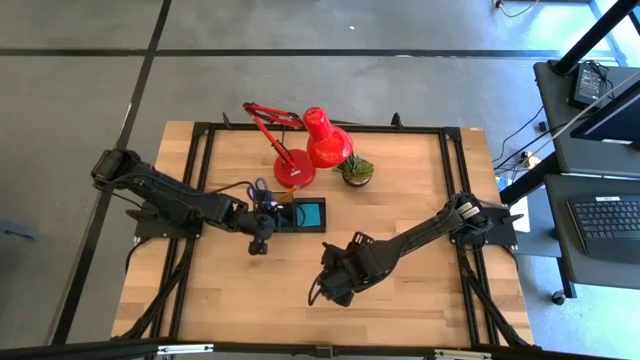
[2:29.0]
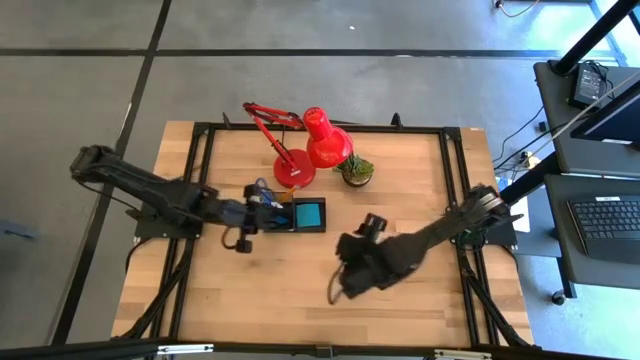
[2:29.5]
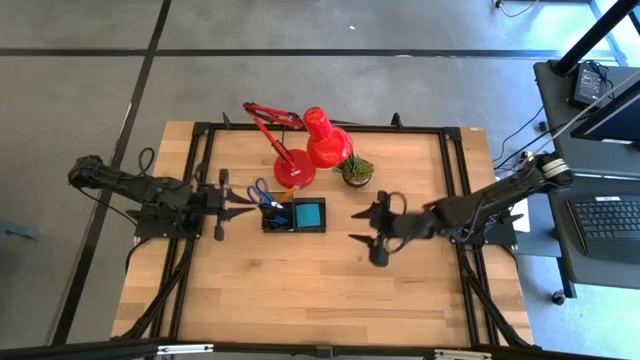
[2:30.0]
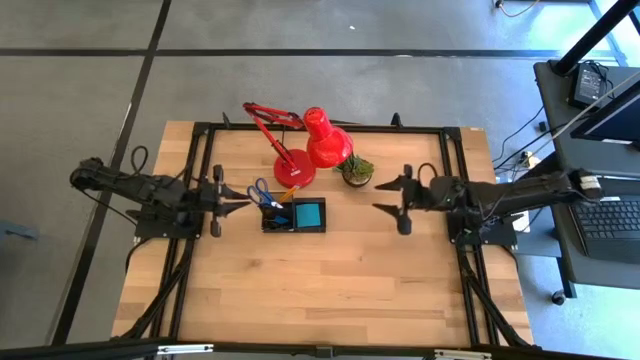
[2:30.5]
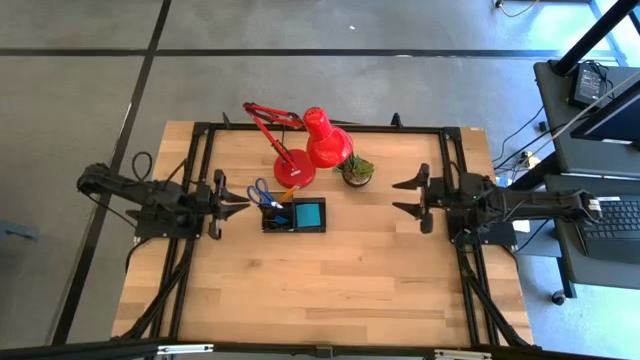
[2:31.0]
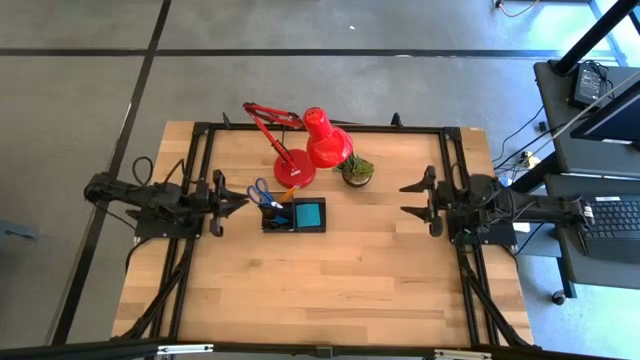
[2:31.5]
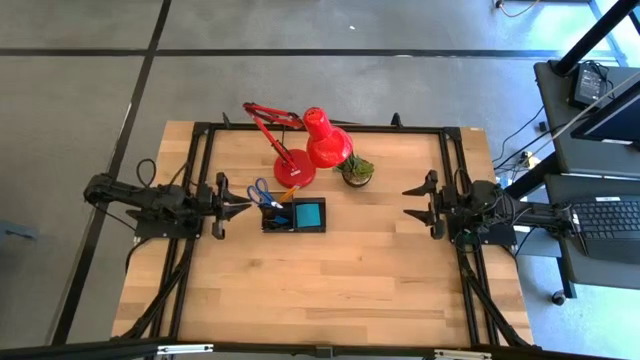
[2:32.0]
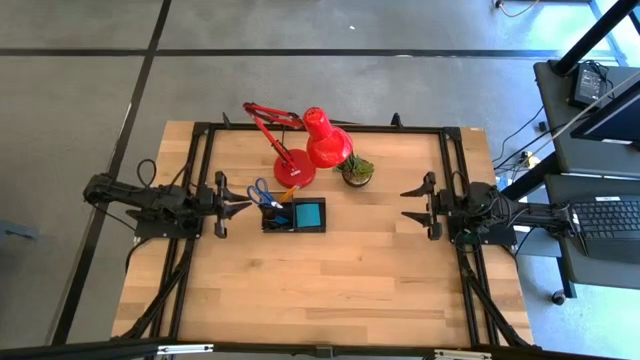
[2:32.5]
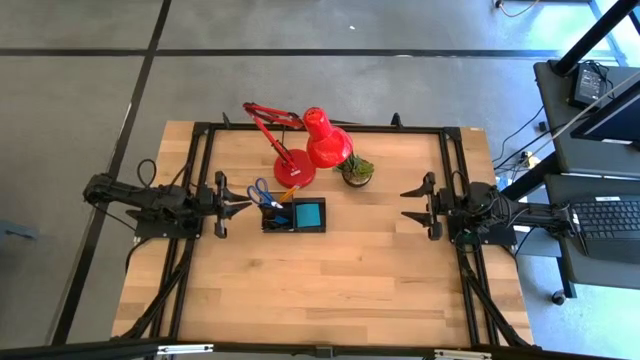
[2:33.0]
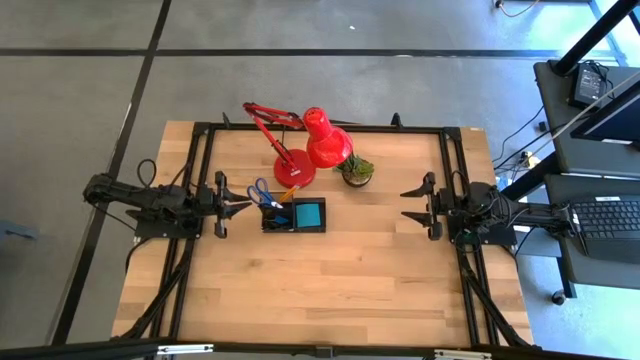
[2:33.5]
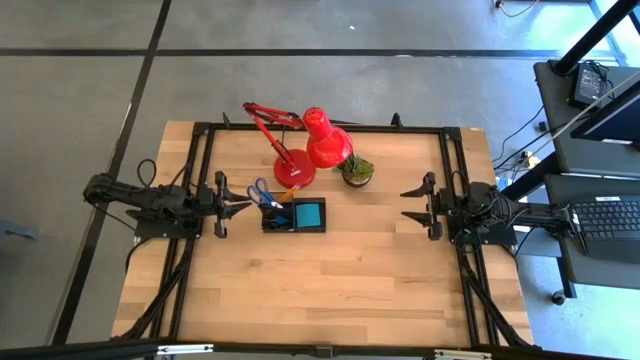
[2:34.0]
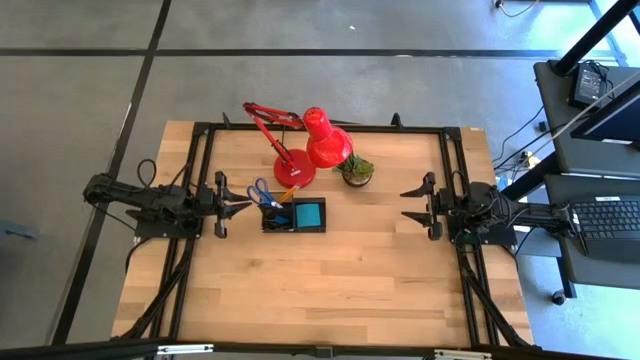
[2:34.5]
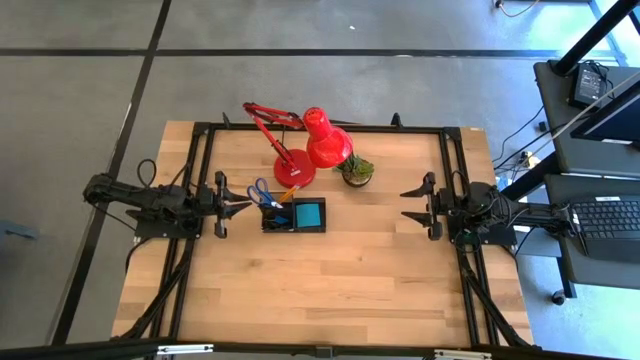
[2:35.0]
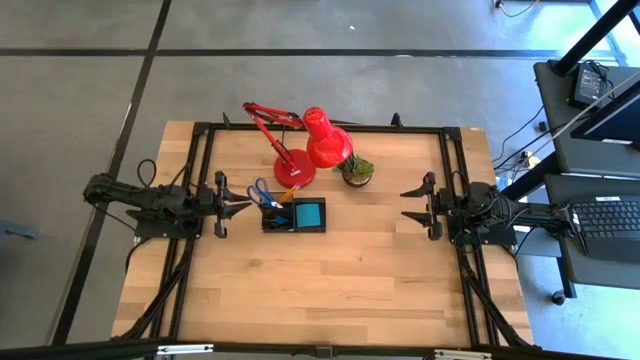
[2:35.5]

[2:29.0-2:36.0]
Task: Pick and place office supplies into organizer
Return to Home Position

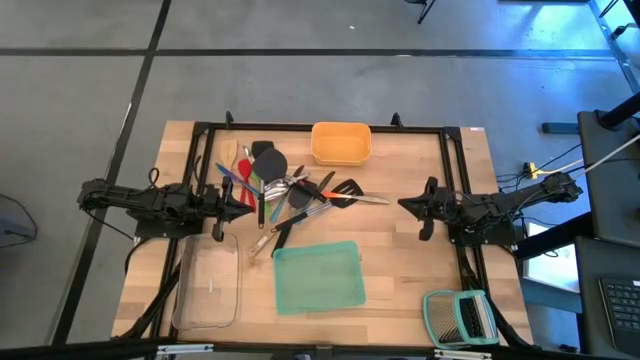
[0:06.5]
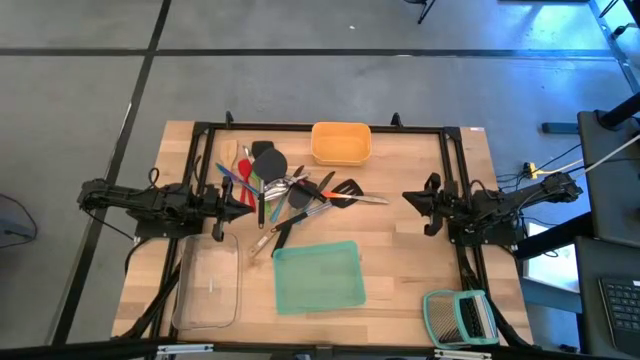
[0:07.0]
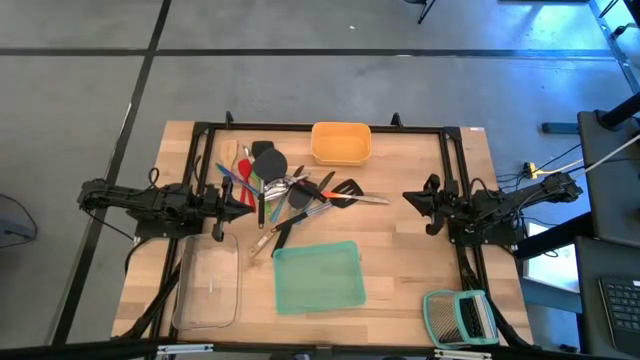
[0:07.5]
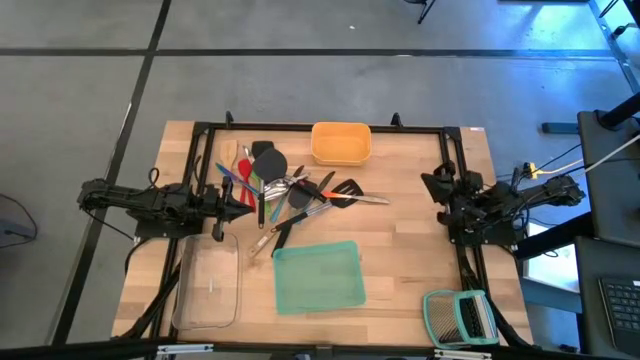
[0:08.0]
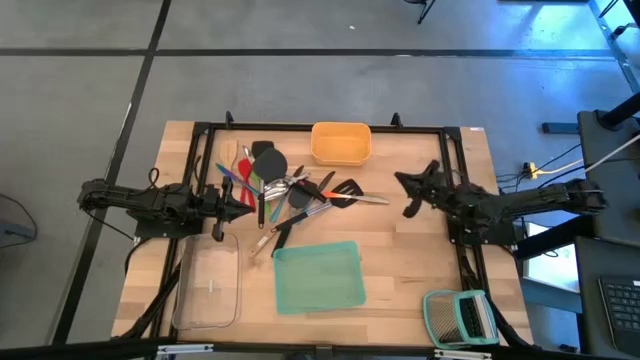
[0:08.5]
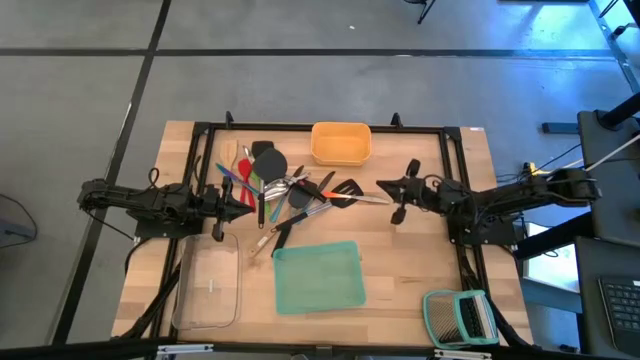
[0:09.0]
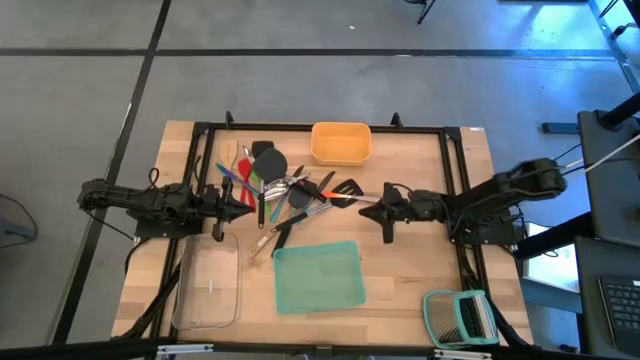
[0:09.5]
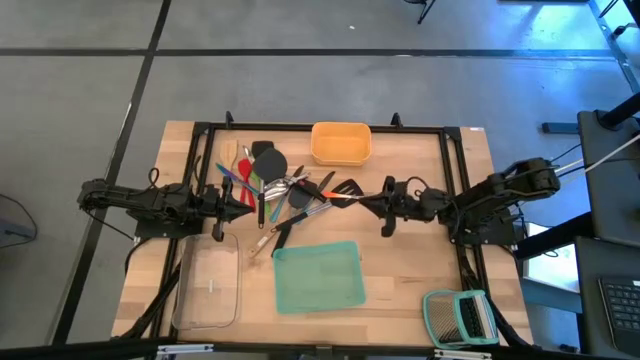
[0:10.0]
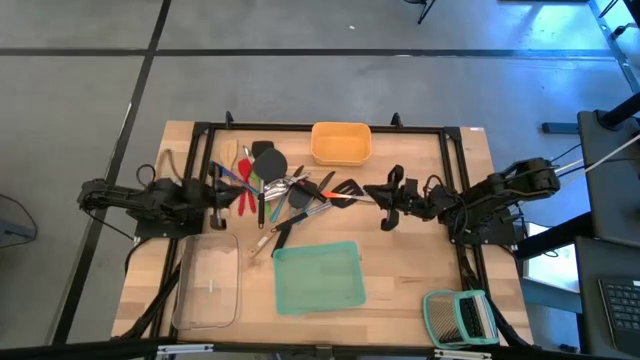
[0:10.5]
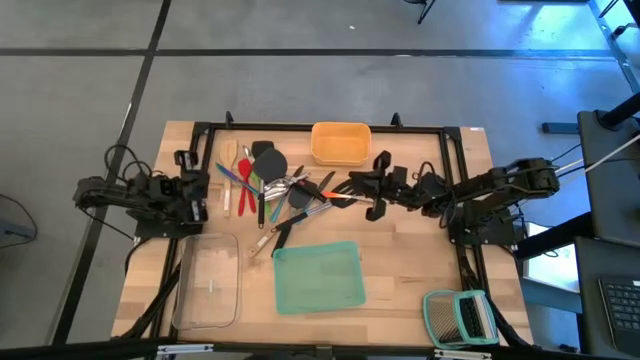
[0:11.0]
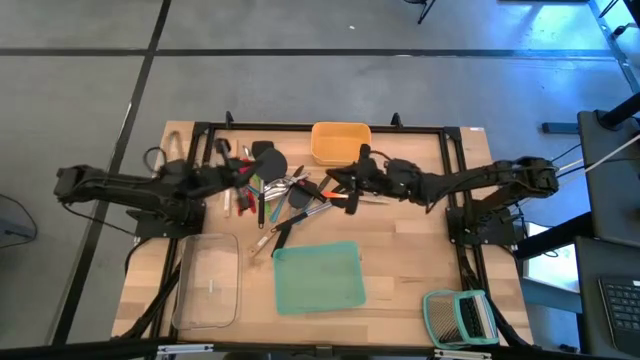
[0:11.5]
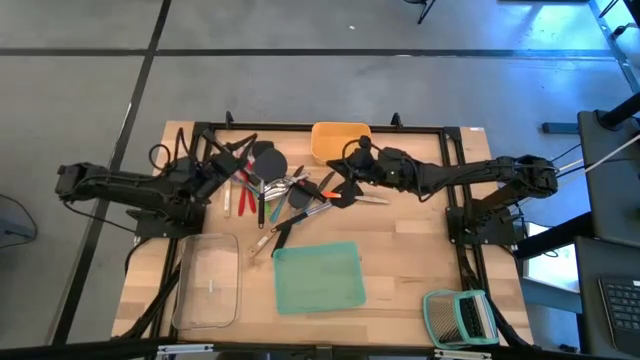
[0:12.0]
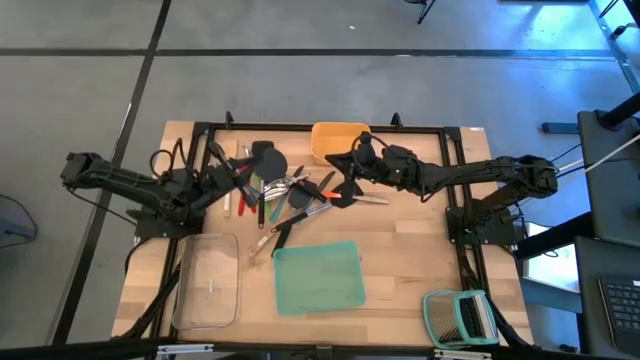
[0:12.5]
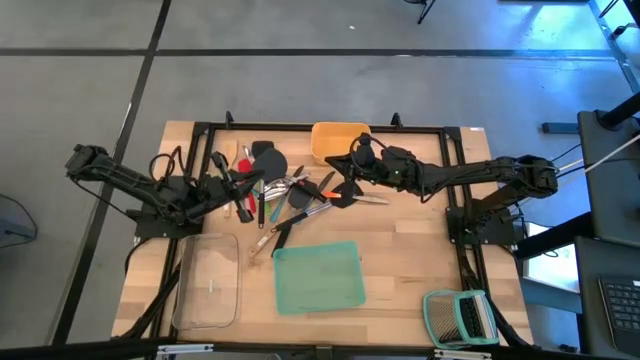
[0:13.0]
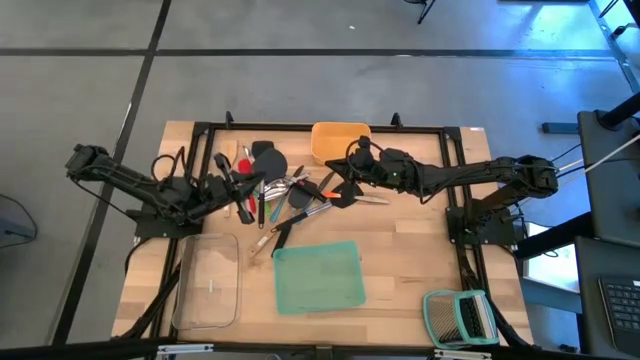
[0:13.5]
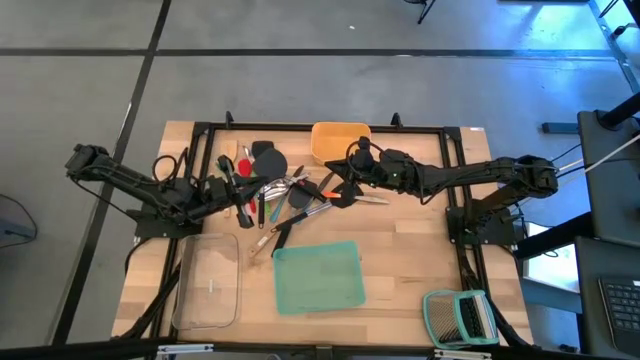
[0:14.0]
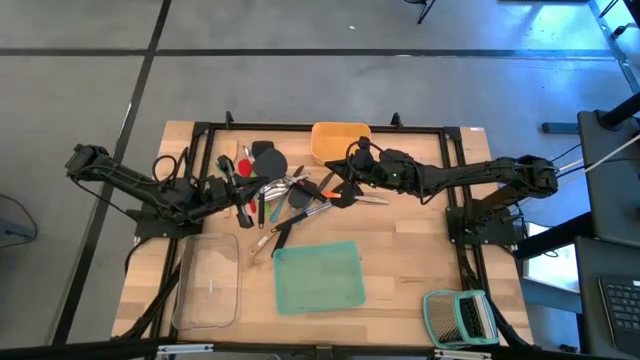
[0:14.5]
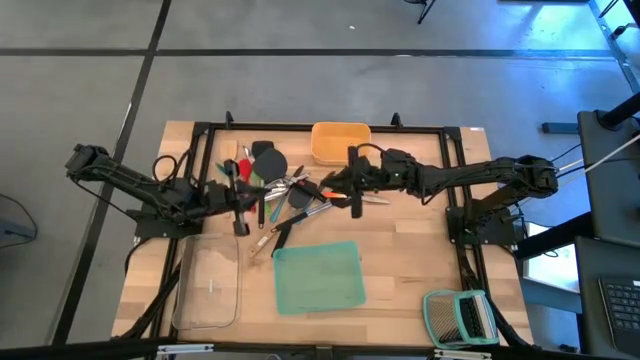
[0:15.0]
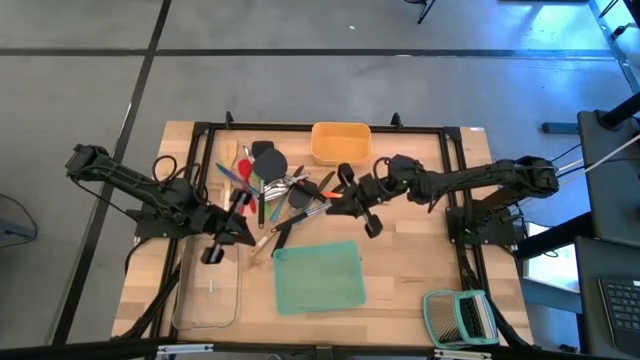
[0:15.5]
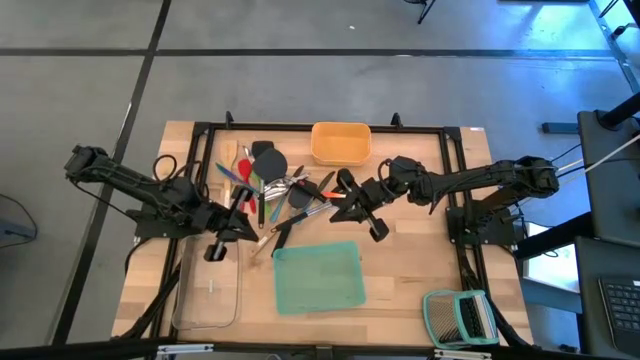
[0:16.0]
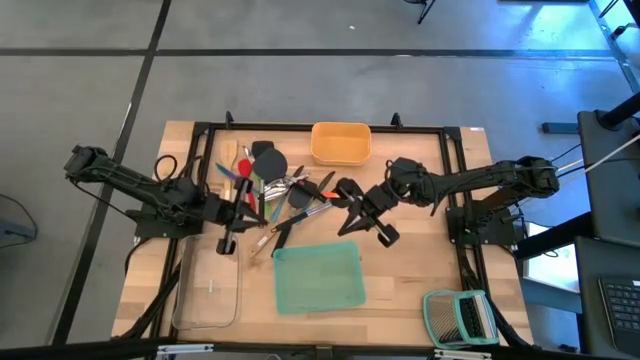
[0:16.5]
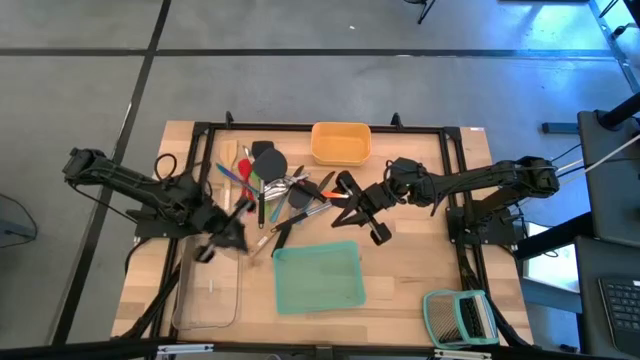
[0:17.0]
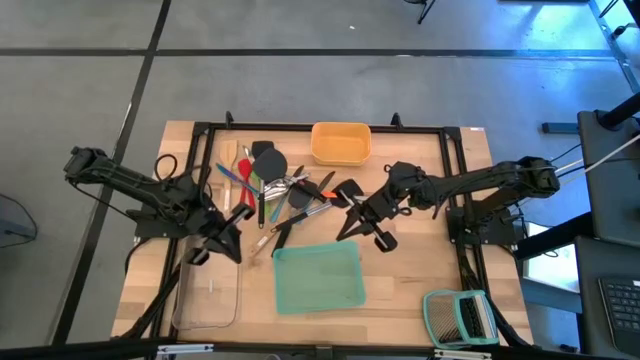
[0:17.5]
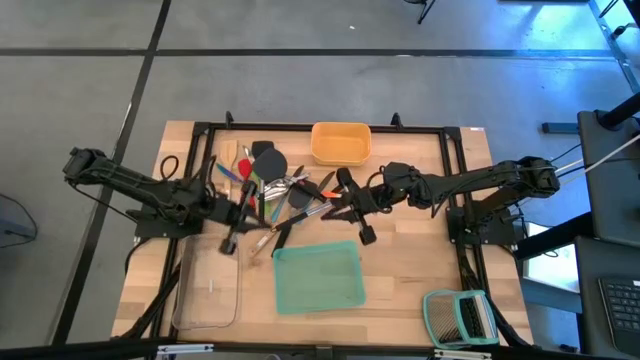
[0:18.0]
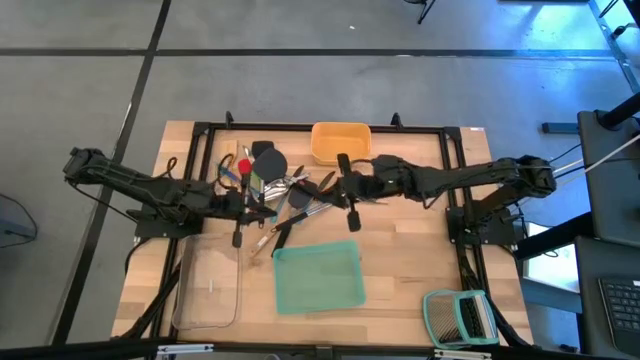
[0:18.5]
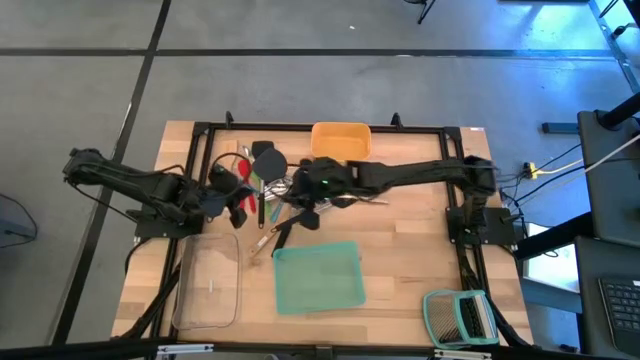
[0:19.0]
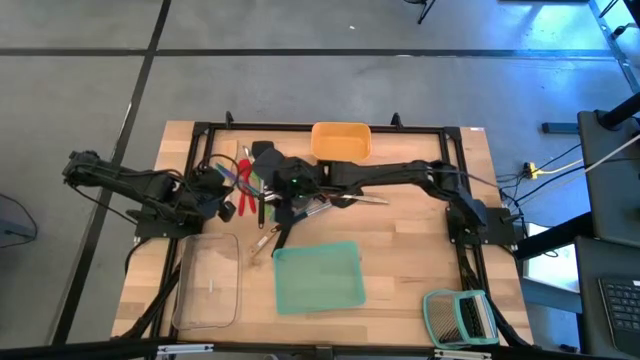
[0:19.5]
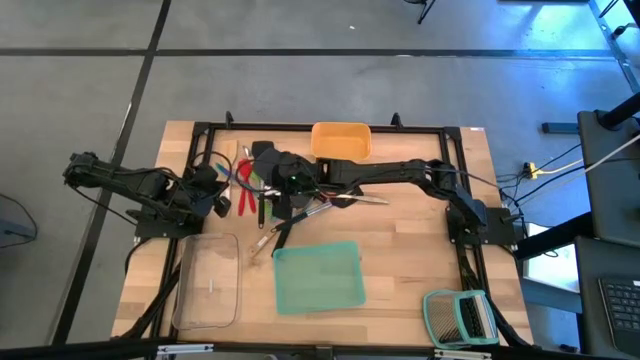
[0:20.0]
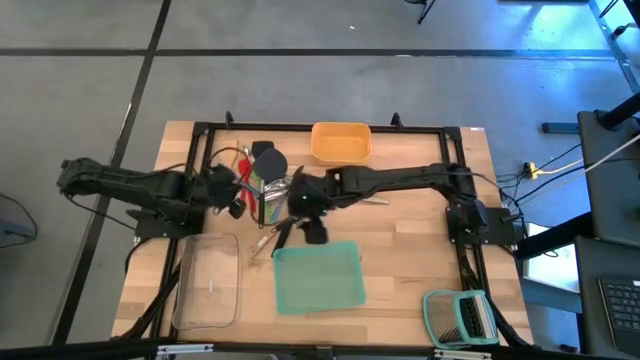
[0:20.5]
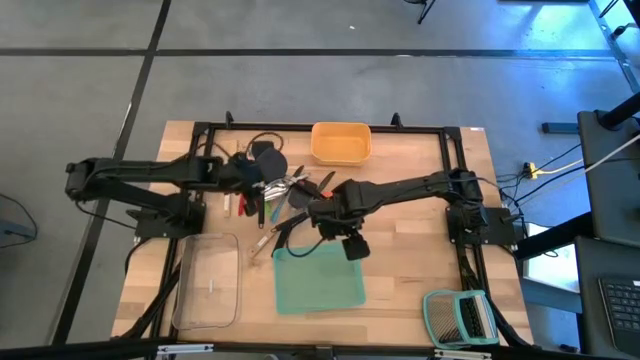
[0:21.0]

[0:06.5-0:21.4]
Task: Pick & Place Kitchen Items
Put the violet table knife into the green bin
